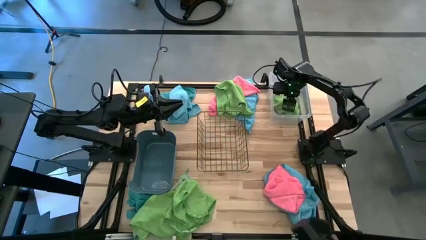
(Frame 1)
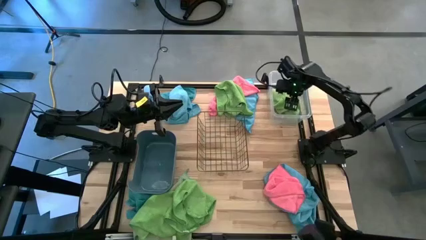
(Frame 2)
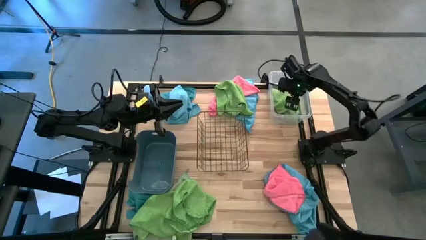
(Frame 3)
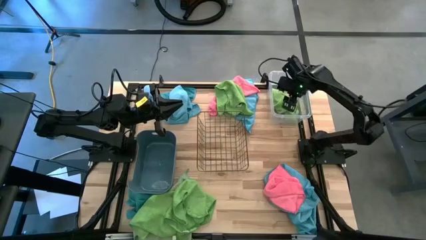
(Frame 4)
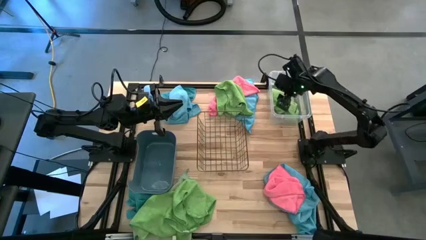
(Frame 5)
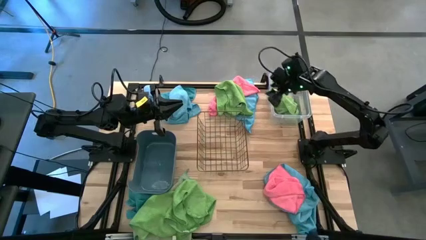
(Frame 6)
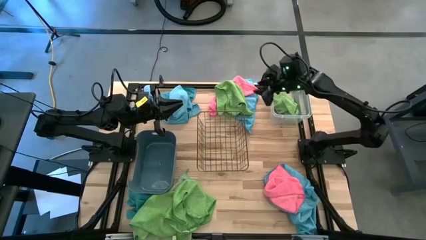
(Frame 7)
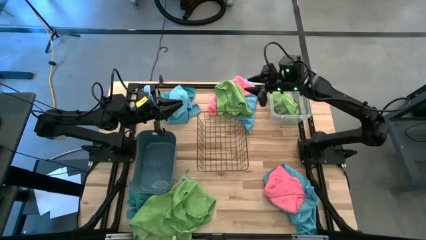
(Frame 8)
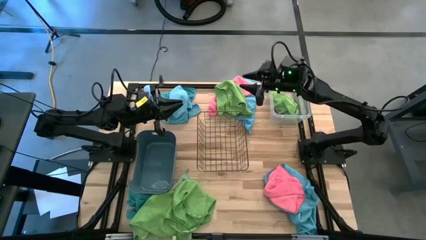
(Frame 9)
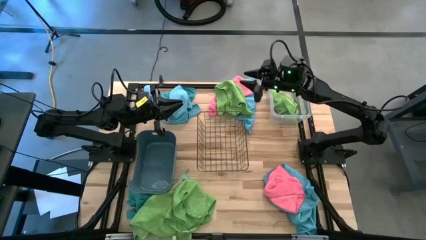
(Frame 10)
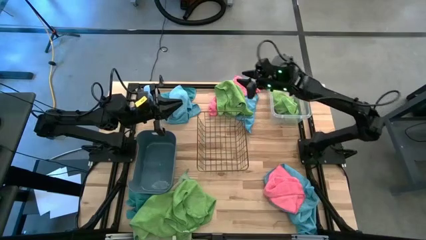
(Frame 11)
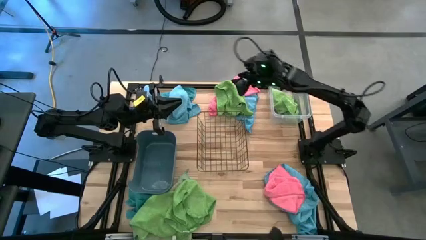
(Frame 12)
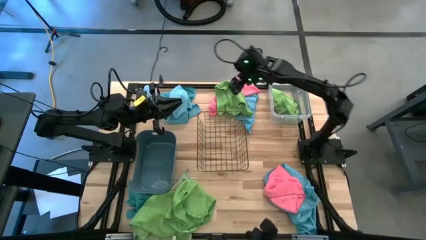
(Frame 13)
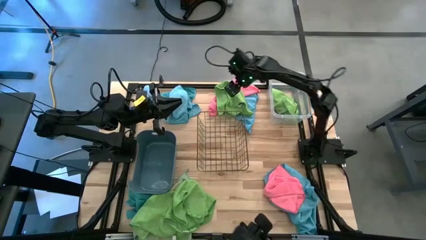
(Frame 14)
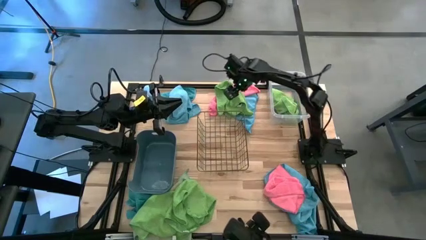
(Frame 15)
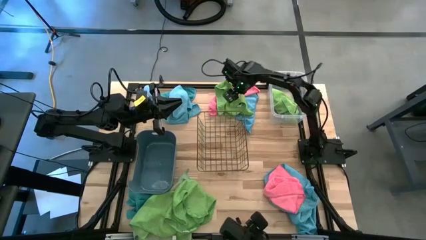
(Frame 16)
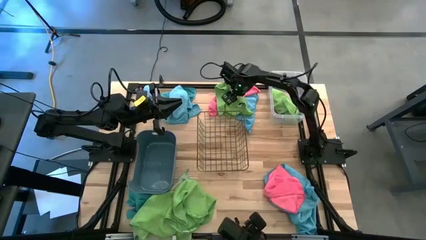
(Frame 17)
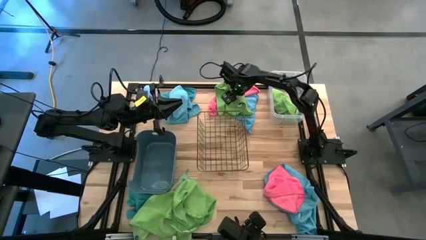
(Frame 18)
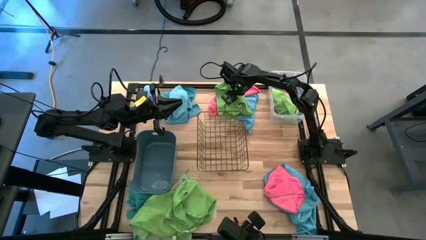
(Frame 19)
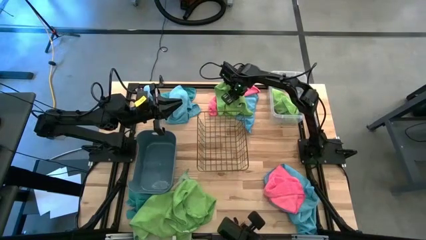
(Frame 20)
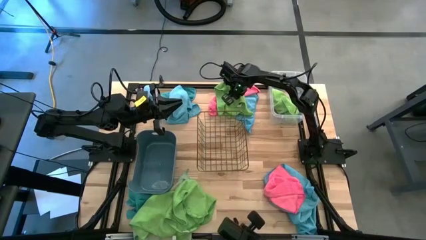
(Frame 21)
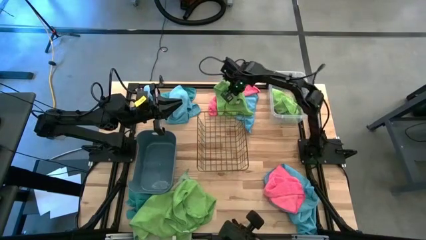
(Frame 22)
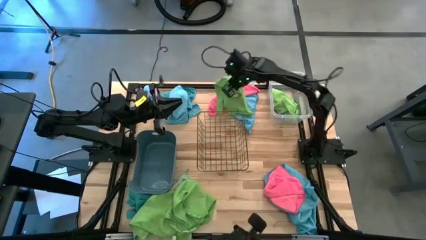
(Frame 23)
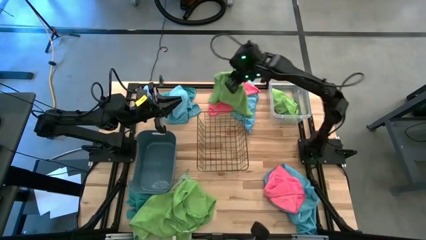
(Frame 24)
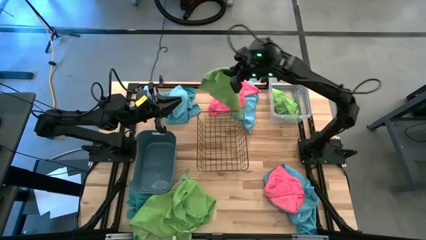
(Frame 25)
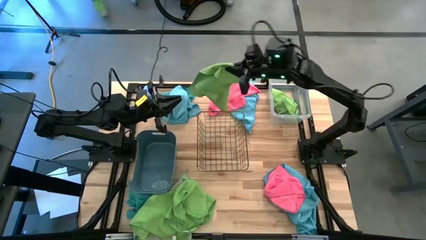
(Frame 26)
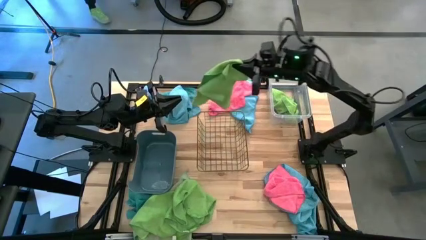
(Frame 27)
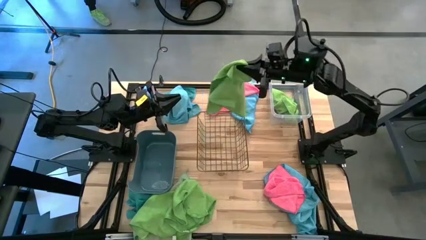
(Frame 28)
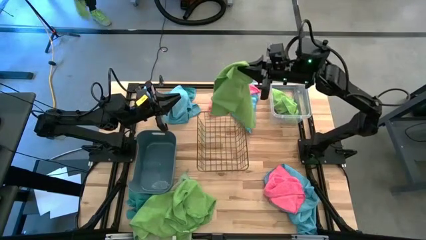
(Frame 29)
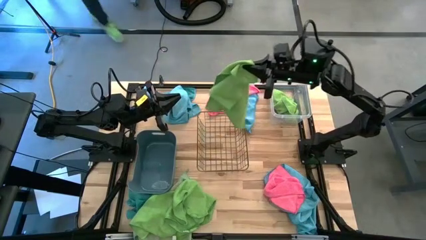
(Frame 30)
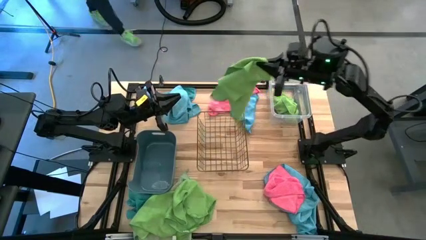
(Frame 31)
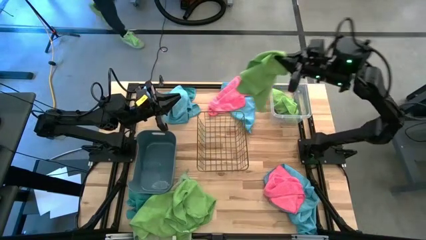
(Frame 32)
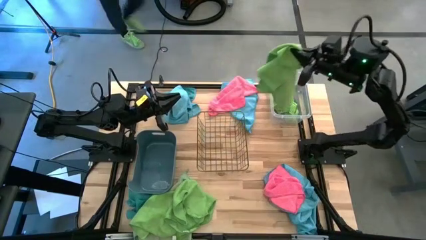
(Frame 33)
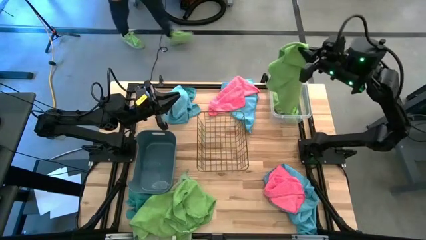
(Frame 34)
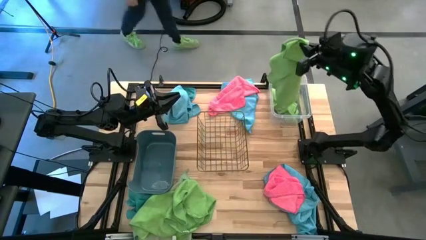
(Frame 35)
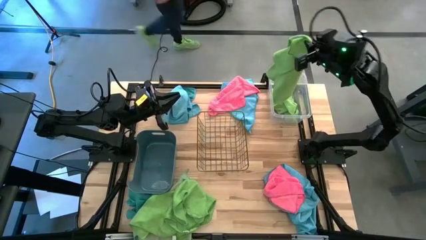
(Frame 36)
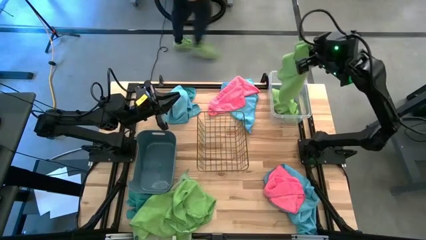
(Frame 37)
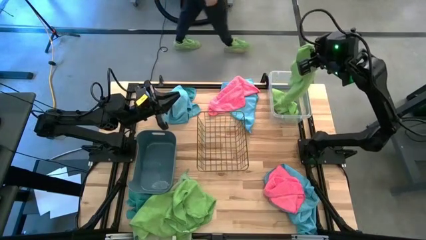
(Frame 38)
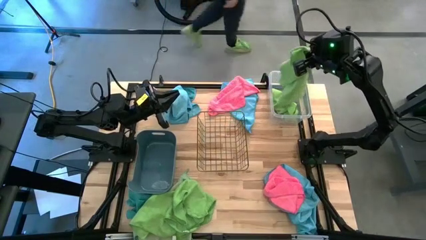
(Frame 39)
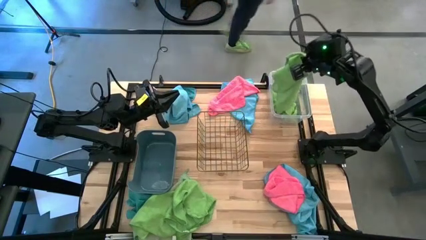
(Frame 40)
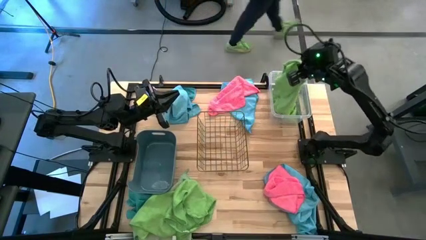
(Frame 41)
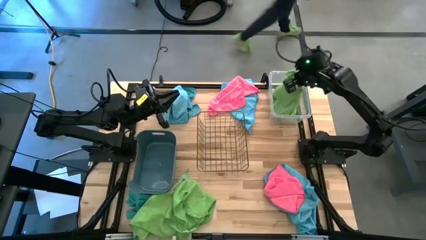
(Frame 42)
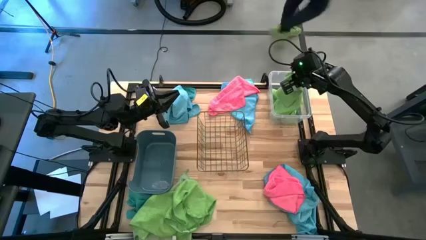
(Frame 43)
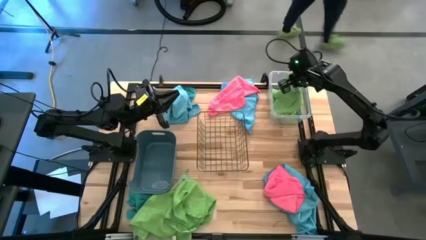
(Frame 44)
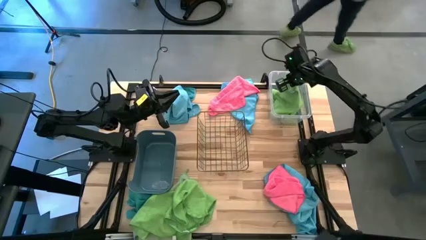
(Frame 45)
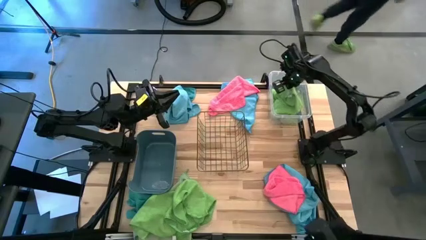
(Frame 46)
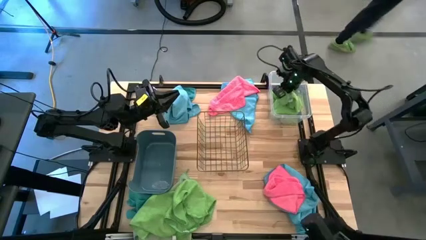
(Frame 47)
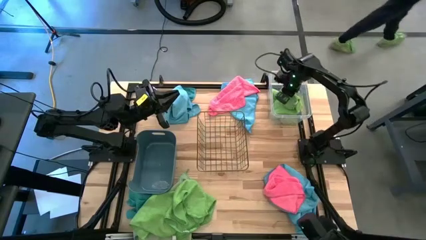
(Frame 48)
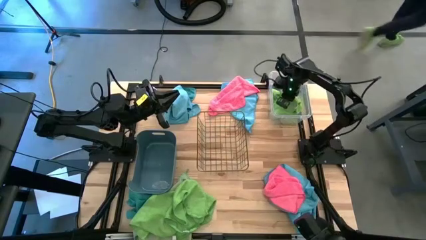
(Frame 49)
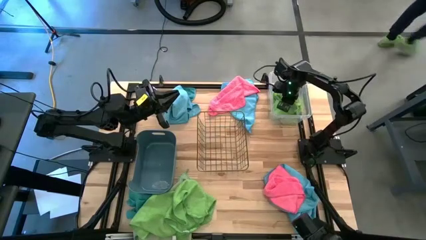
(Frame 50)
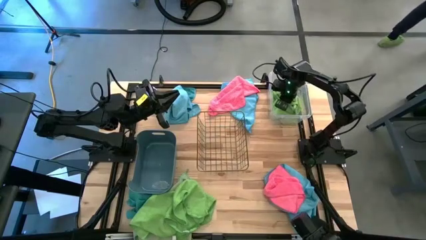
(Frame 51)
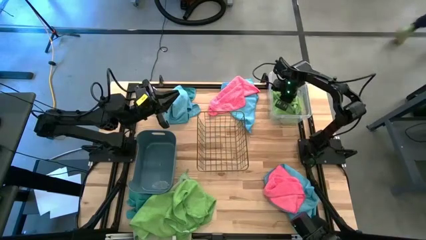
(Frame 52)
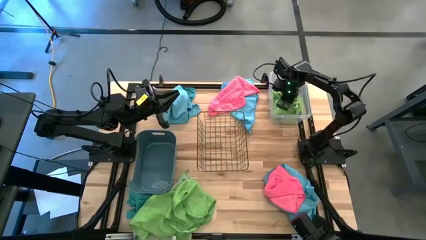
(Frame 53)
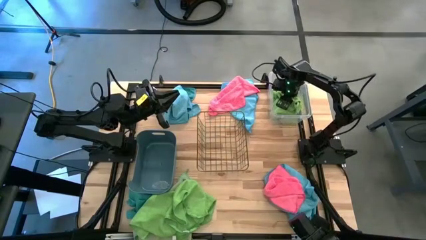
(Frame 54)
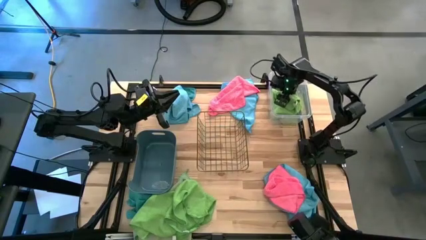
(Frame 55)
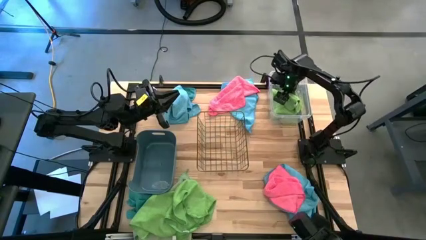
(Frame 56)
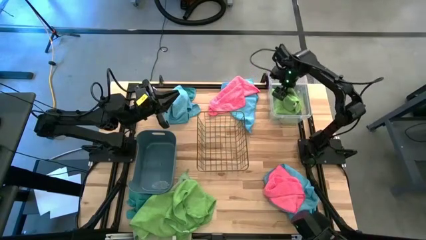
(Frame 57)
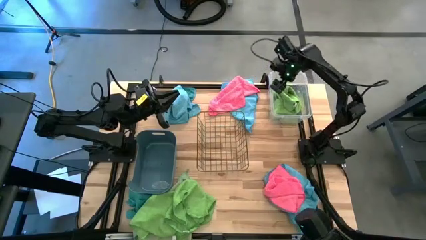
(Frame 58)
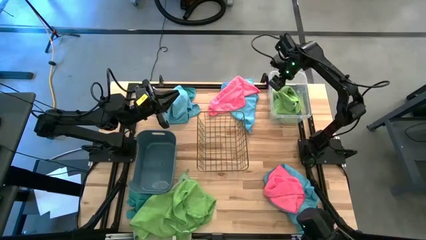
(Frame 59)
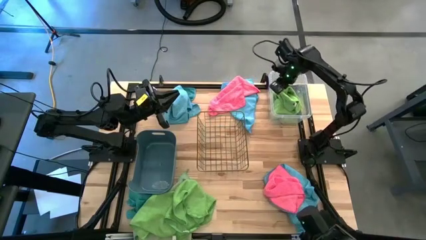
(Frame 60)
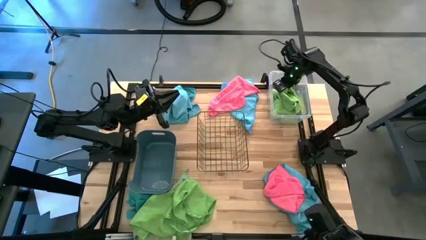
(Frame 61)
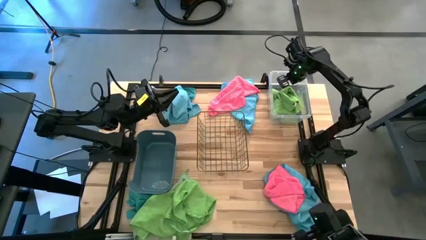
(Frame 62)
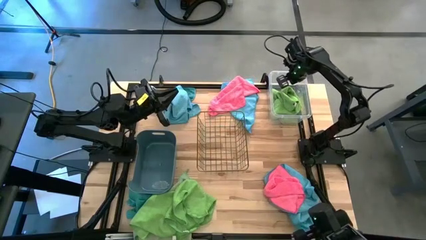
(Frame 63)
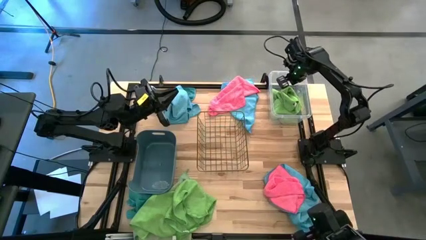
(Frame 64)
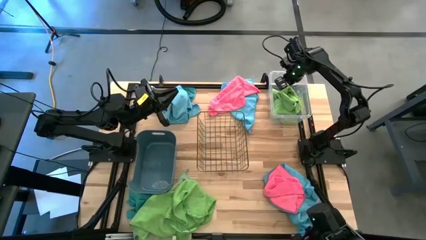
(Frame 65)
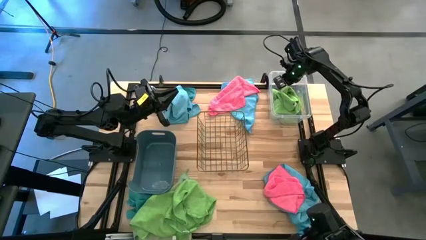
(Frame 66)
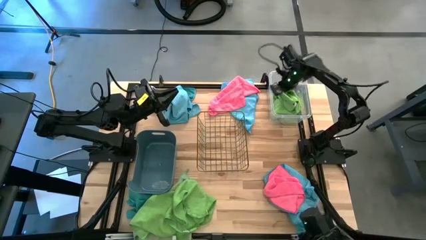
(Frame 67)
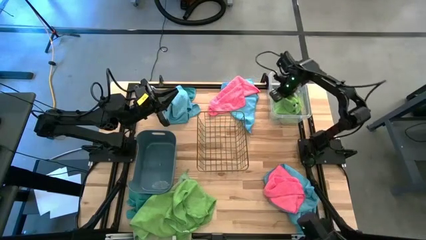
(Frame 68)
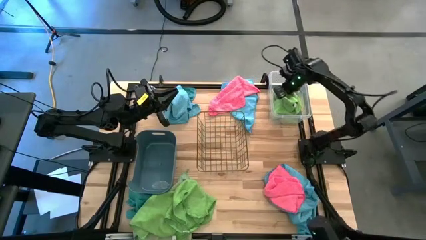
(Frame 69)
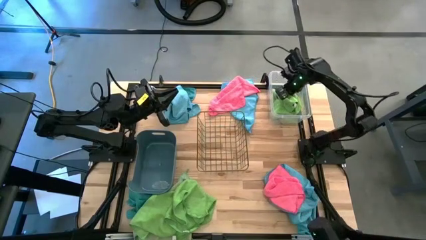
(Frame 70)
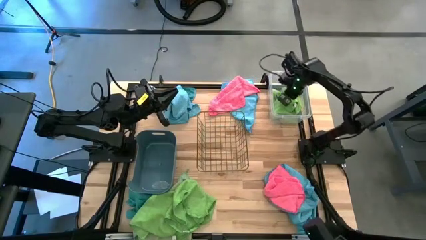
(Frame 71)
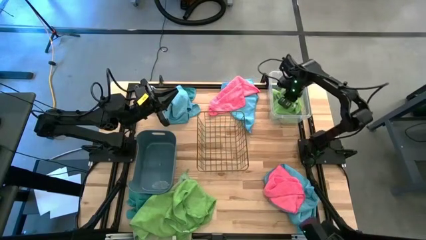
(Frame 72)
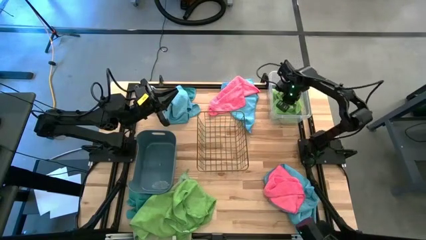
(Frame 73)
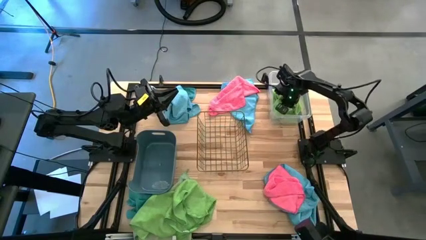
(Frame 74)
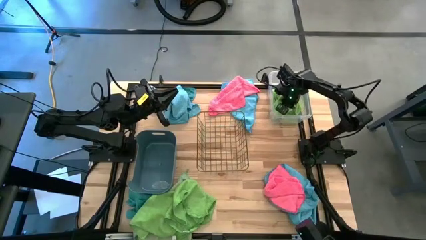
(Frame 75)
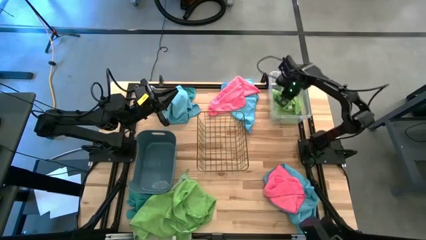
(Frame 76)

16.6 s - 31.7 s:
Task: Sort microfiber towel by color & place in baskets
Put the top green towel into the transparent bin
